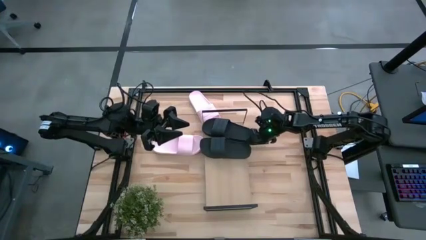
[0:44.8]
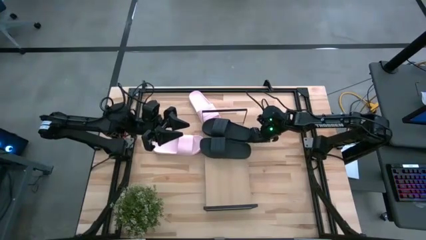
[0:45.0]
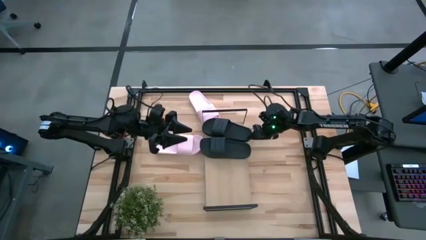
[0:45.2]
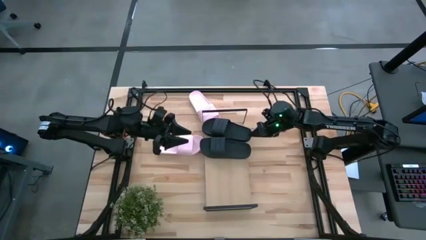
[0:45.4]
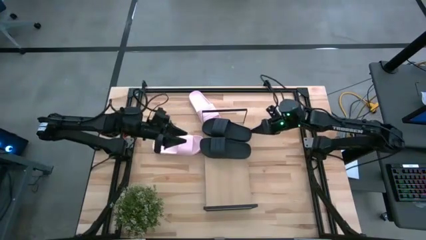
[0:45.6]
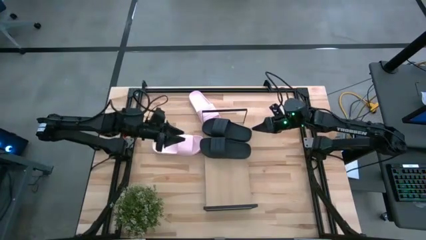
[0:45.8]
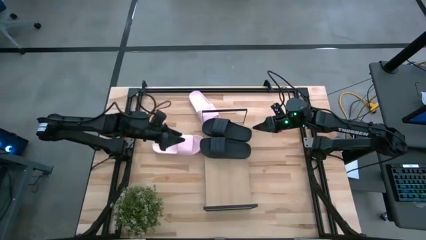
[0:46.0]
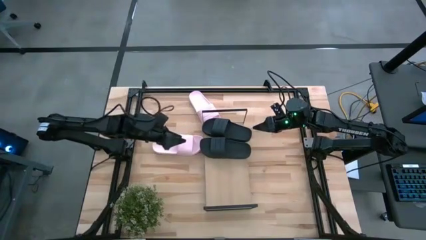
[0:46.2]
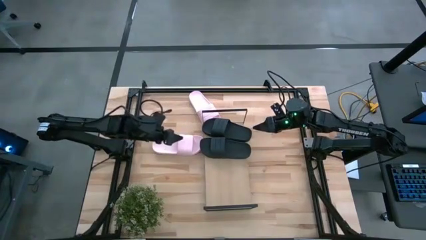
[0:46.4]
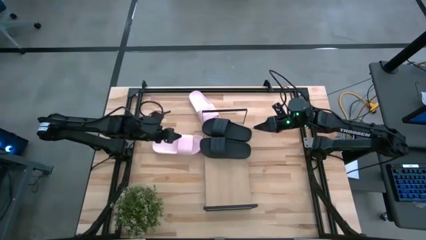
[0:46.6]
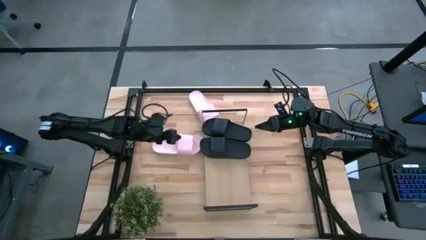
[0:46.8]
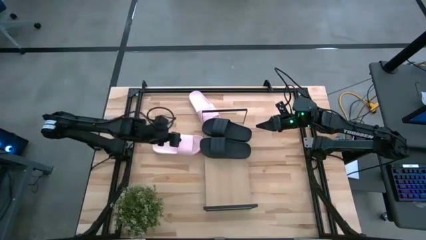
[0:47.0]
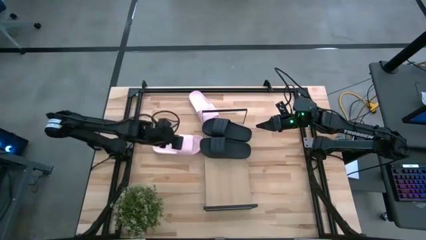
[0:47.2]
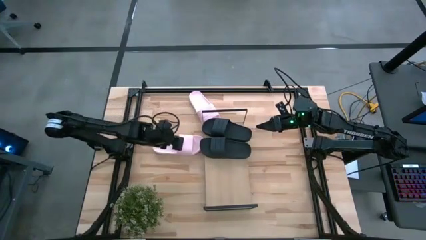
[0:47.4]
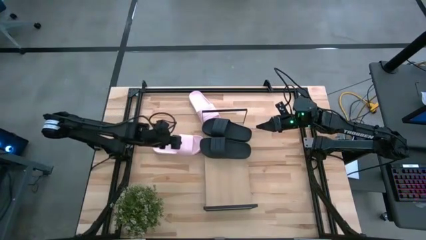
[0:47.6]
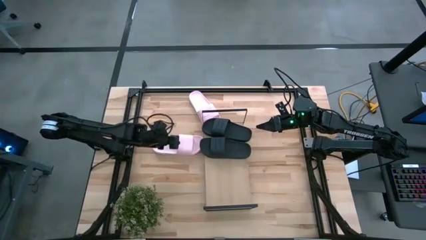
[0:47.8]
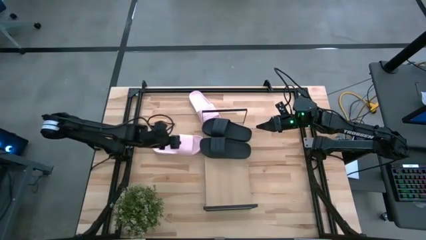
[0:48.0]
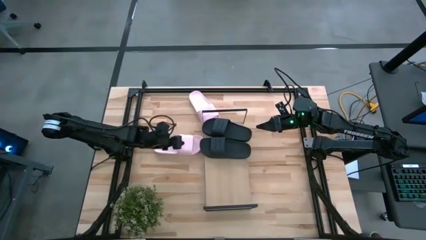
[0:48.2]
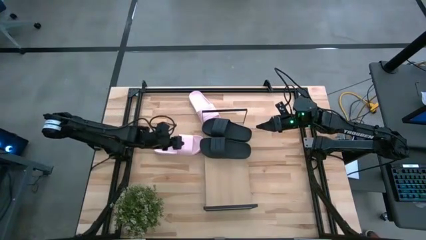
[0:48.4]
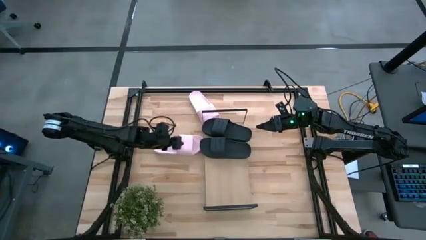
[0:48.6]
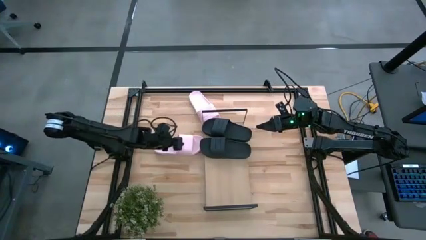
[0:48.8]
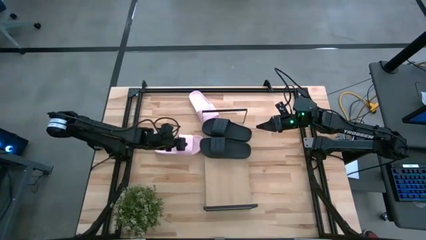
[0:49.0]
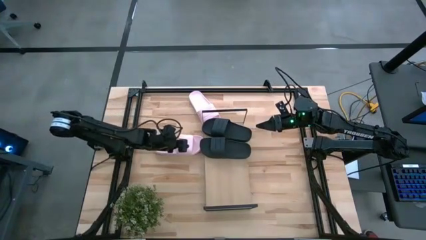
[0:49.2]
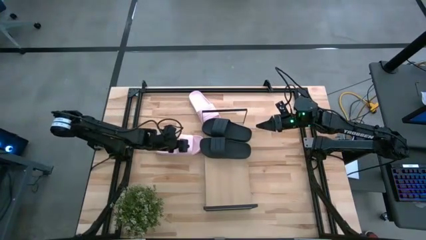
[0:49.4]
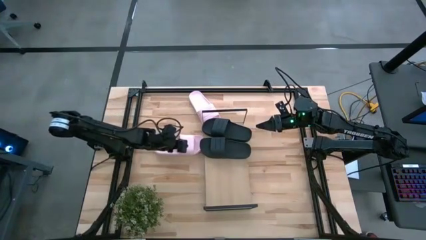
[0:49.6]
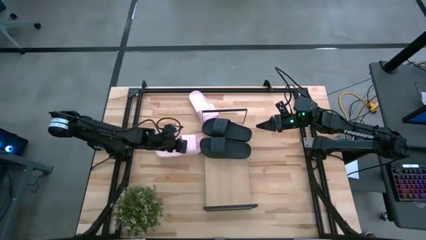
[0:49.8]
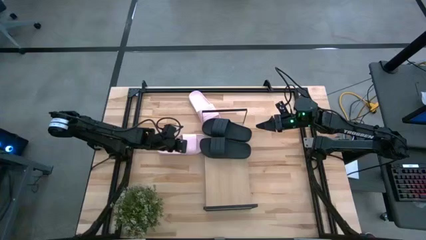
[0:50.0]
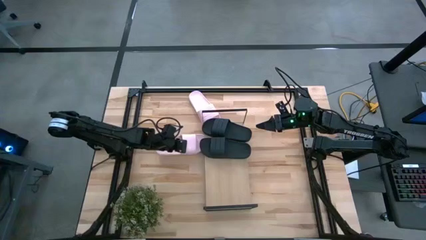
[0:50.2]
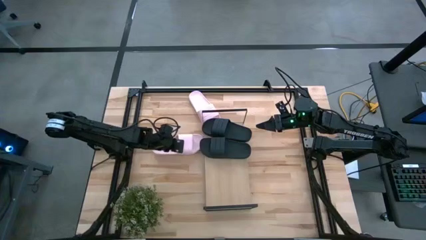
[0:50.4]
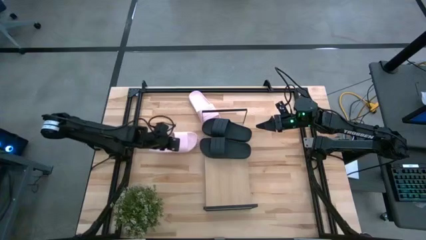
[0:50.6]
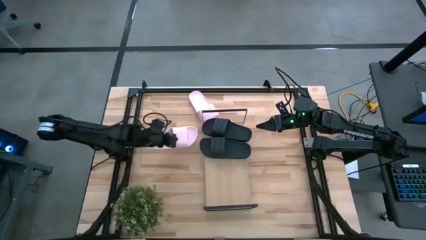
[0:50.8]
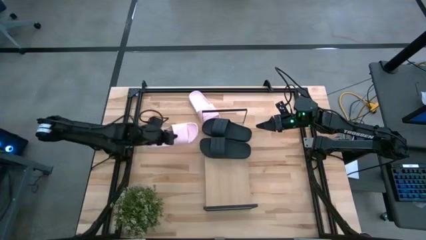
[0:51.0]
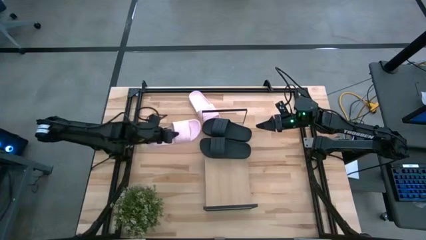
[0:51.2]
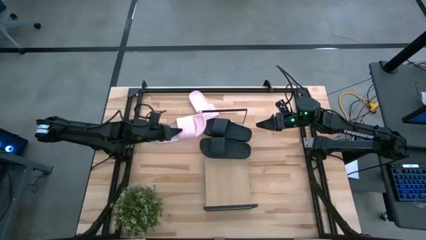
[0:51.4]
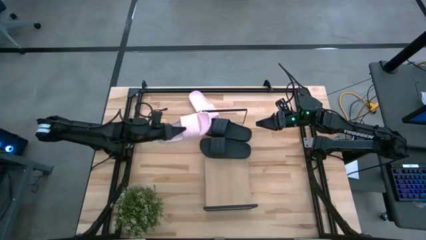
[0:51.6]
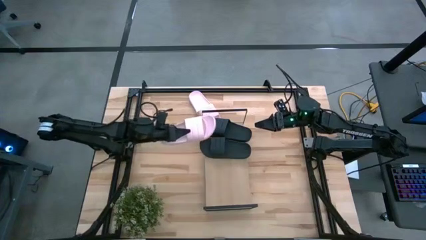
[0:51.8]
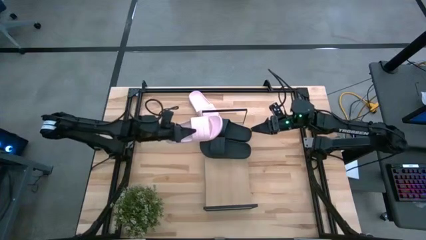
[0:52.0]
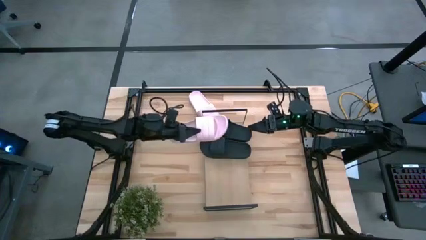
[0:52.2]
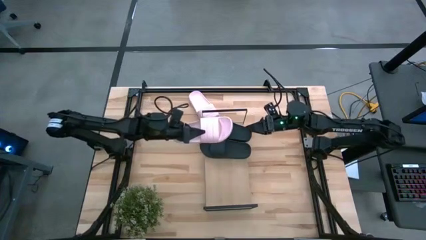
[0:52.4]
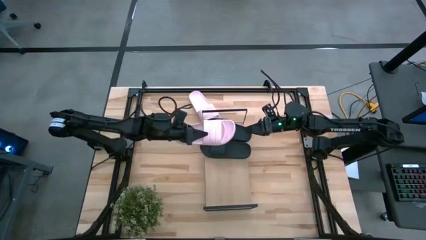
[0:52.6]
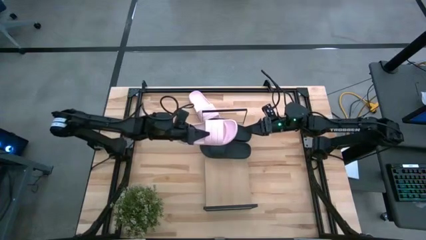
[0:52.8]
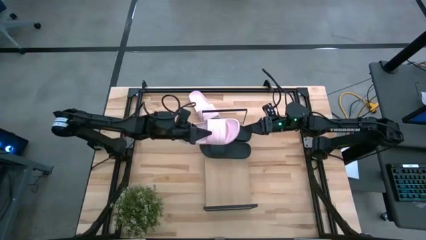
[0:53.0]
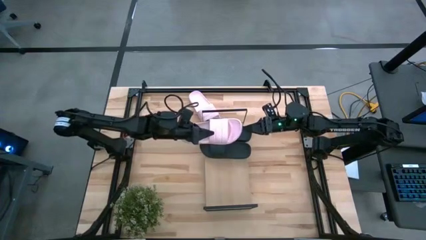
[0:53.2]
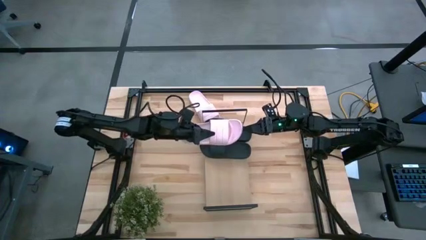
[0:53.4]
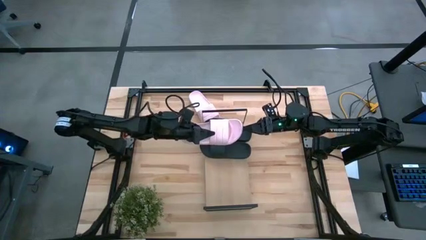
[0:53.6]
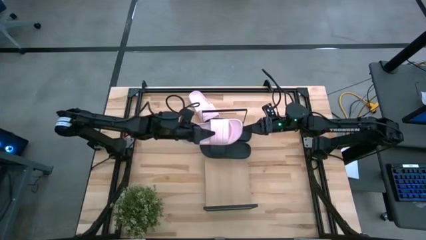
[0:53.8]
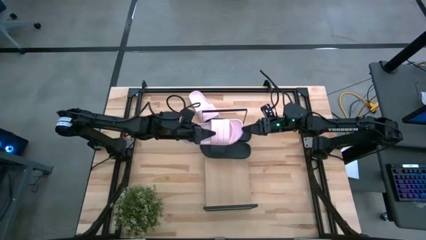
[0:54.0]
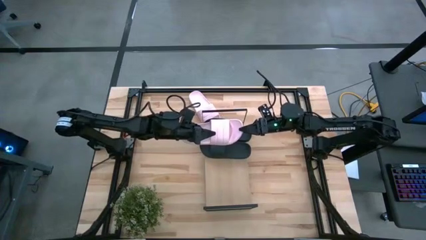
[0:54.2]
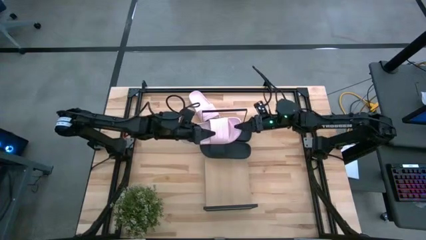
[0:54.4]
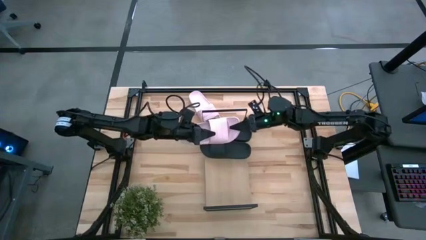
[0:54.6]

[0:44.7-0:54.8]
Task: Pick and place slides into the shelf
Put the bottom pink slide on the shelf
